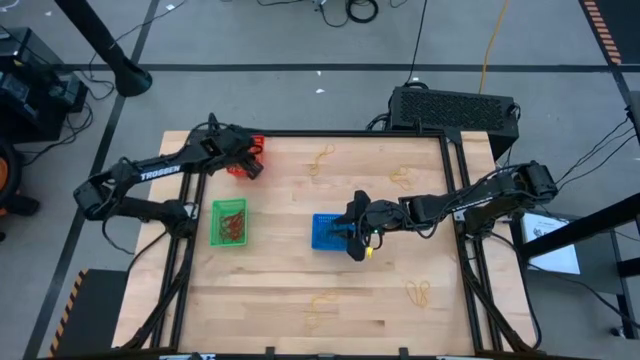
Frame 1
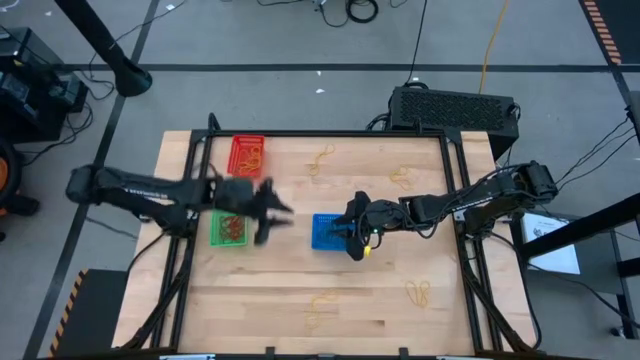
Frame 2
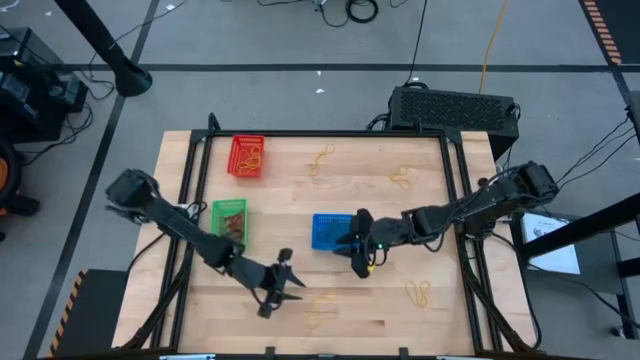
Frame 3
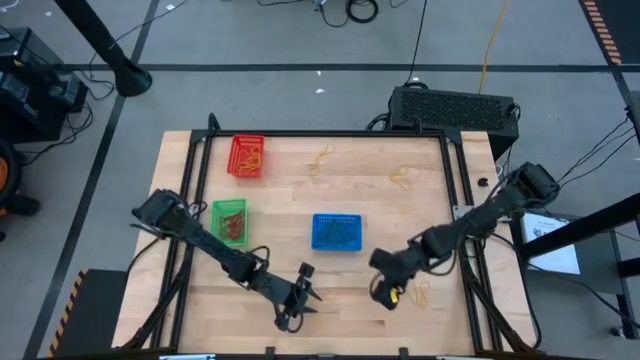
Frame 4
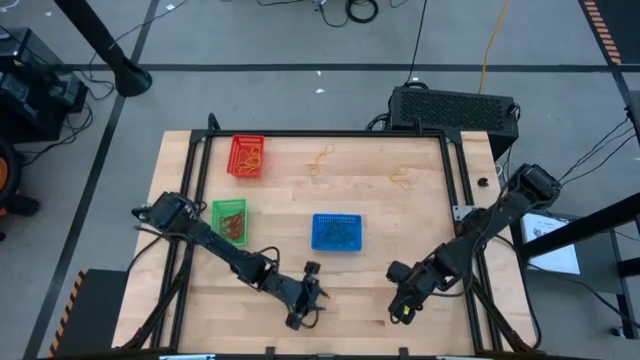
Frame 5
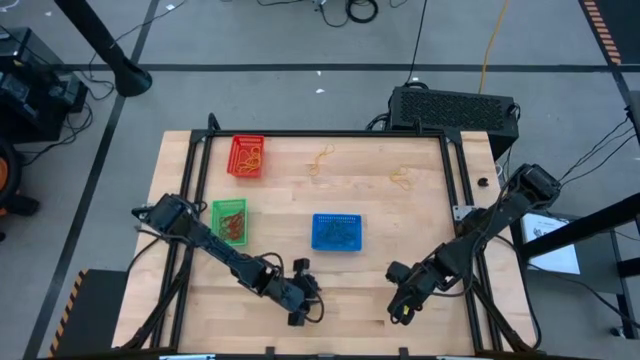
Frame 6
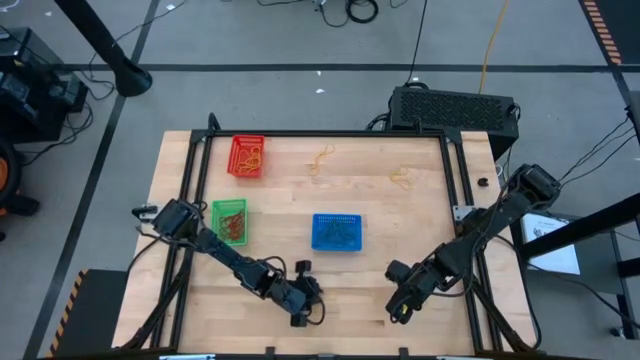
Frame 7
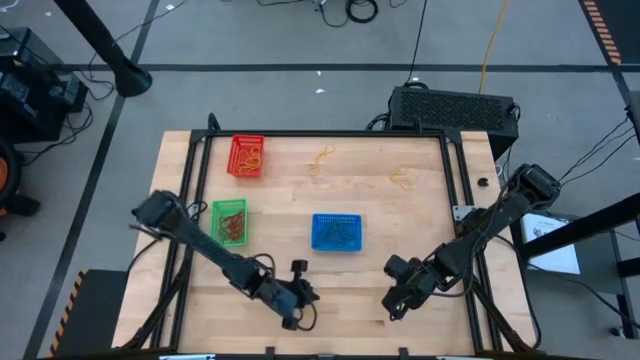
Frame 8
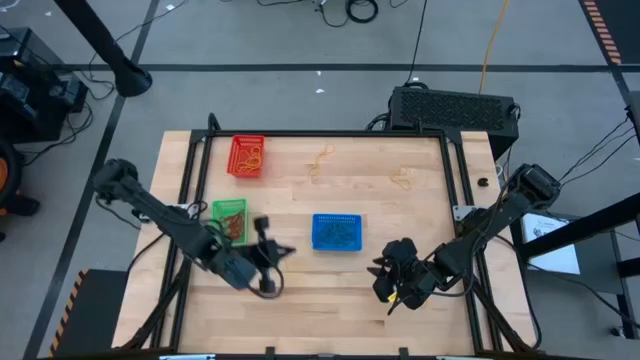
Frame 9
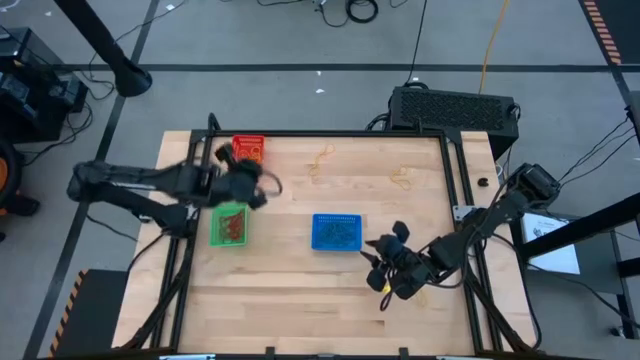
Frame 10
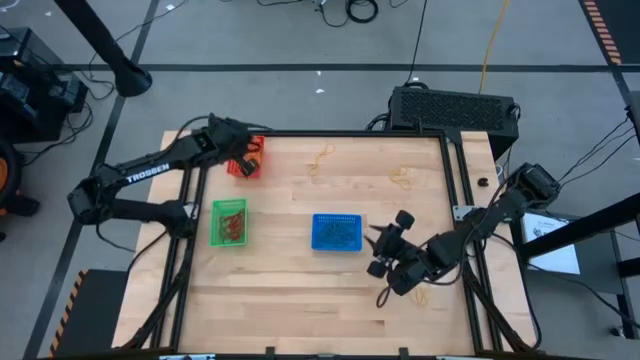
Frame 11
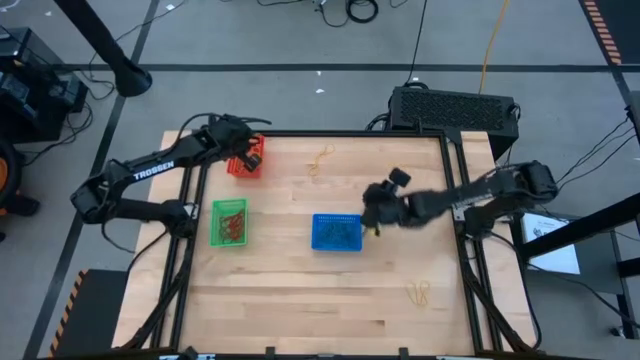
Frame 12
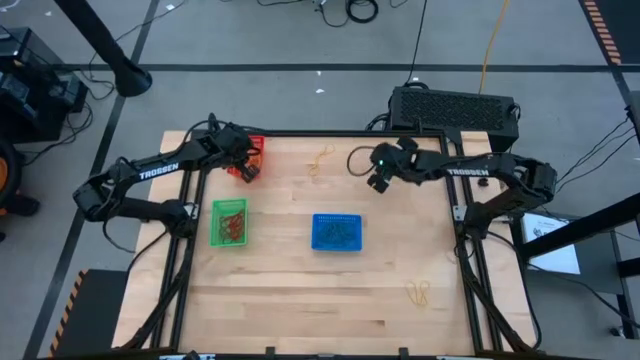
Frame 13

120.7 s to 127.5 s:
Task: Sort rubber bands into baskets
Put the yellow rubber band into the red bin

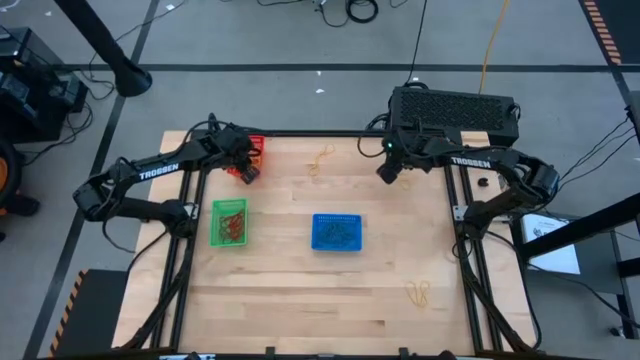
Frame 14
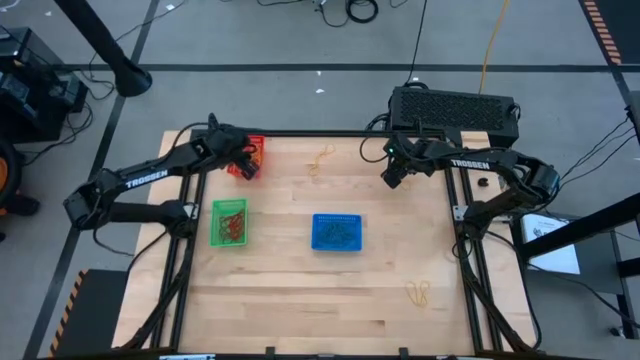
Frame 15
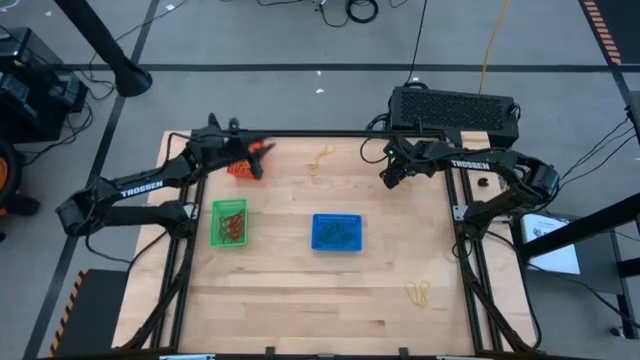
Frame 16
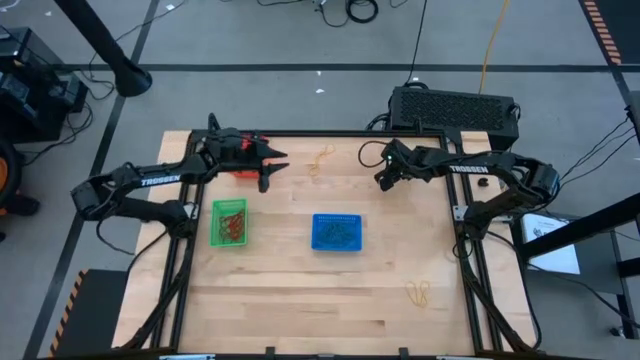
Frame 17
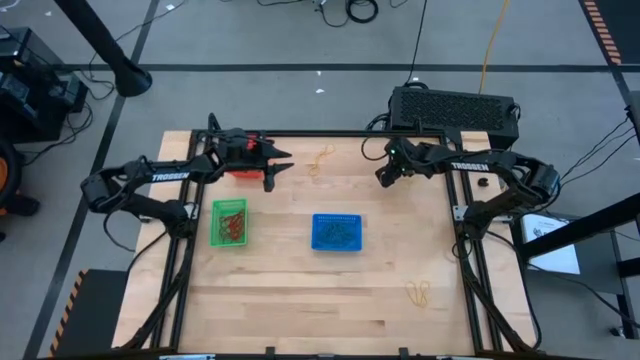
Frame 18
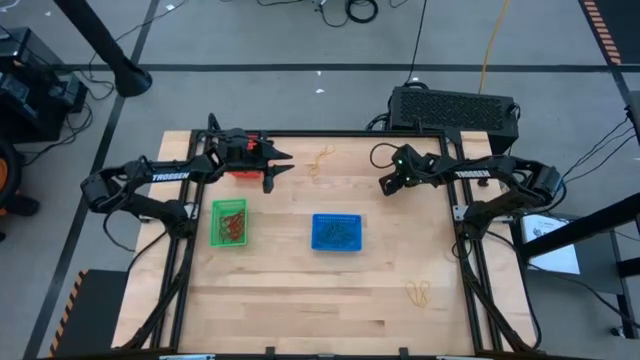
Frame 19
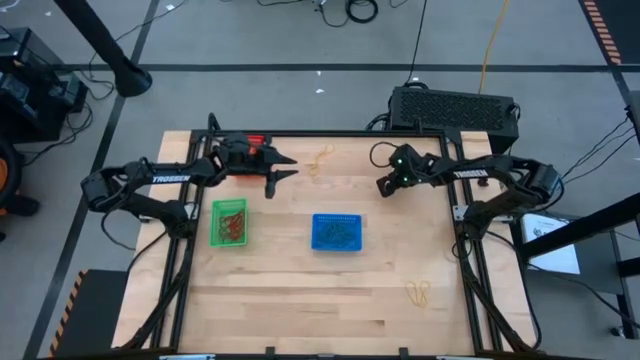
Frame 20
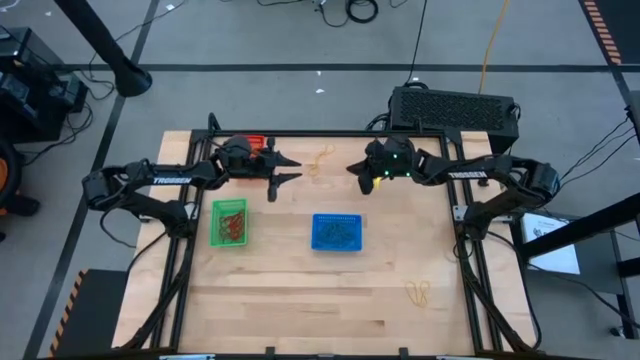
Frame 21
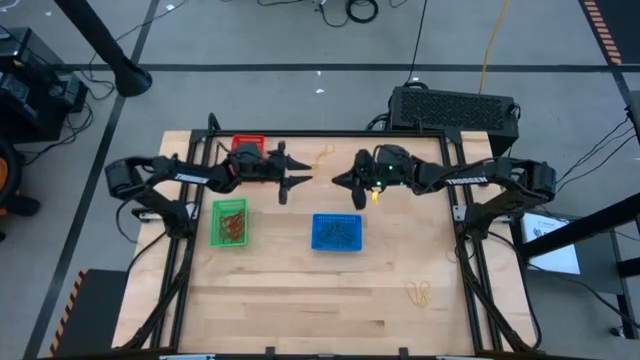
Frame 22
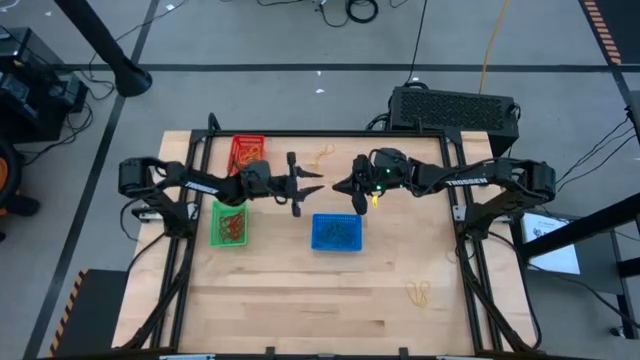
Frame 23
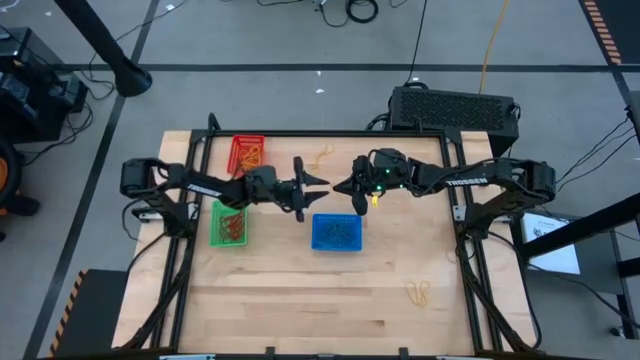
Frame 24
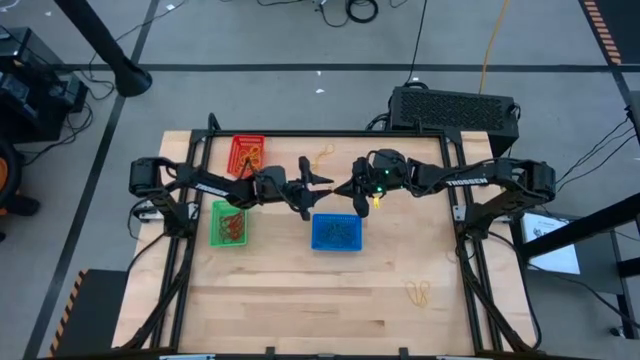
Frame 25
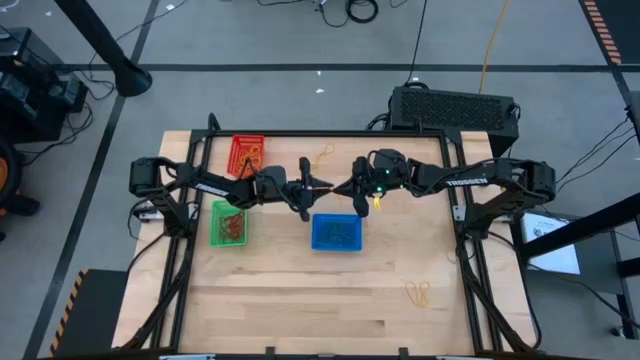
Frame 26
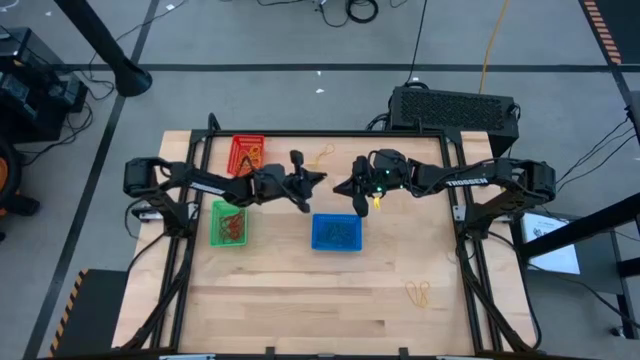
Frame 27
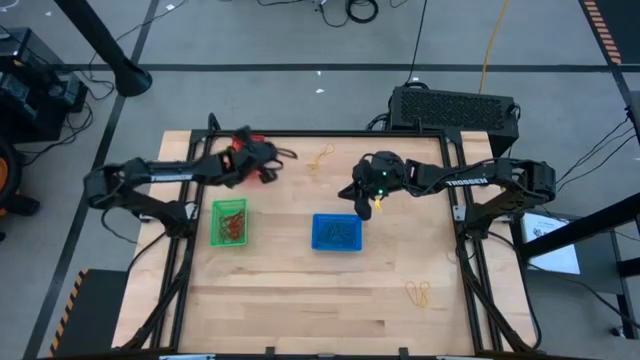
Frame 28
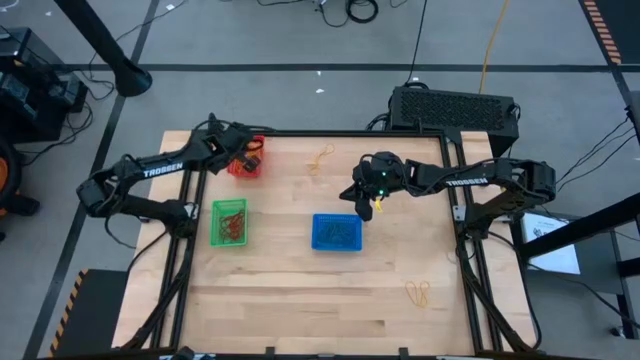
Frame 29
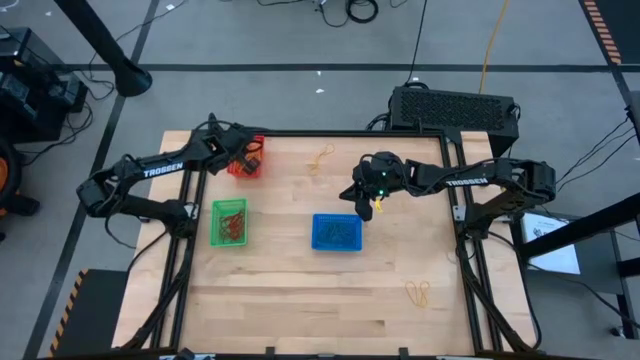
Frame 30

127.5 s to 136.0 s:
Put the yellow rubber band into the red bin

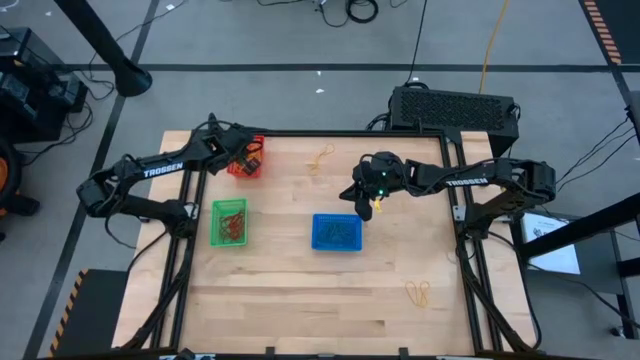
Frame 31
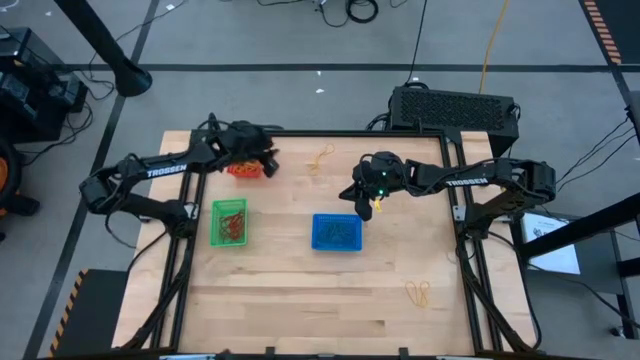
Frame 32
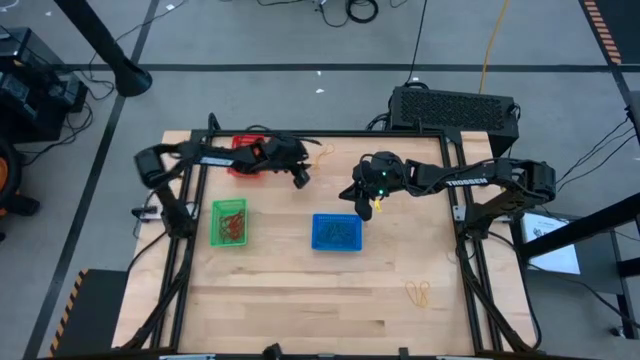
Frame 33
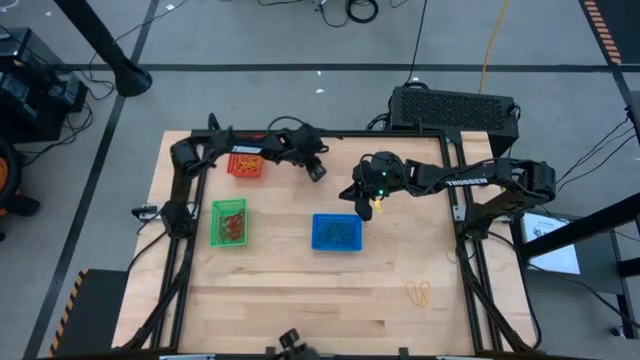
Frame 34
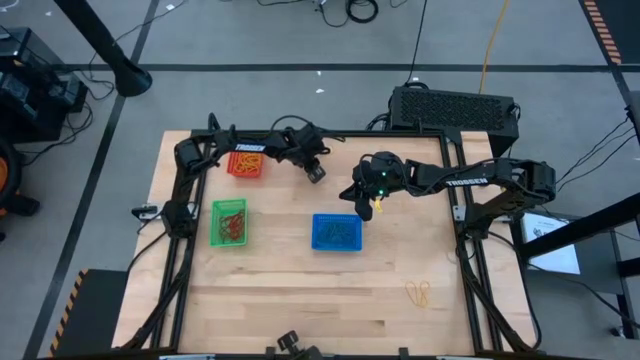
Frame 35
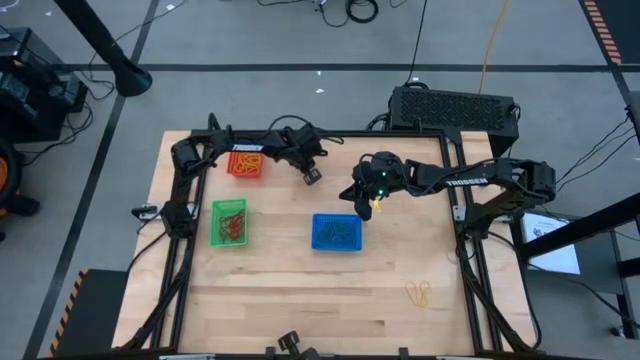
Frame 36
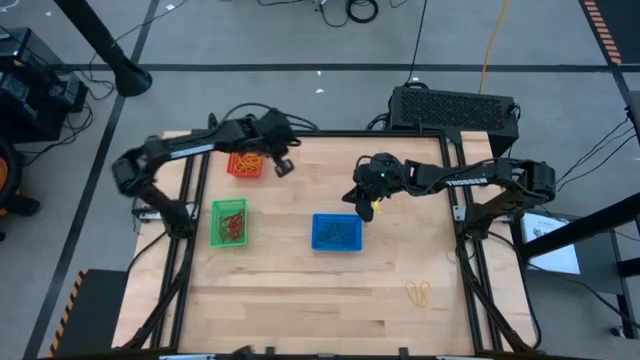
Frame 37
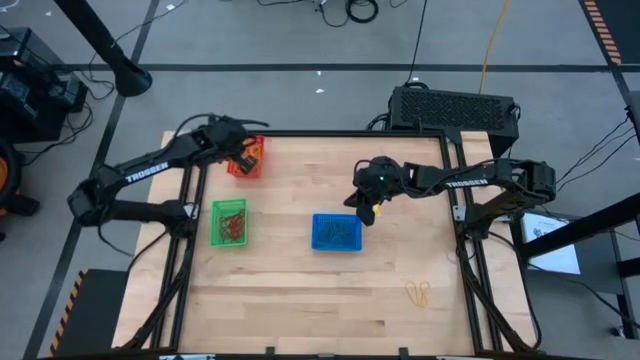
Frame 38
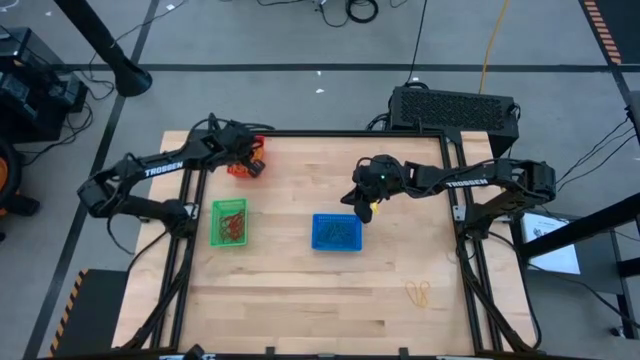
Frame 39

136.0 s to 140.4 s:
Put the yellow rubber band into the red bin

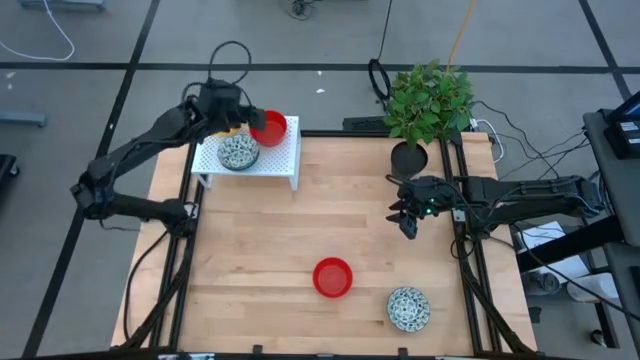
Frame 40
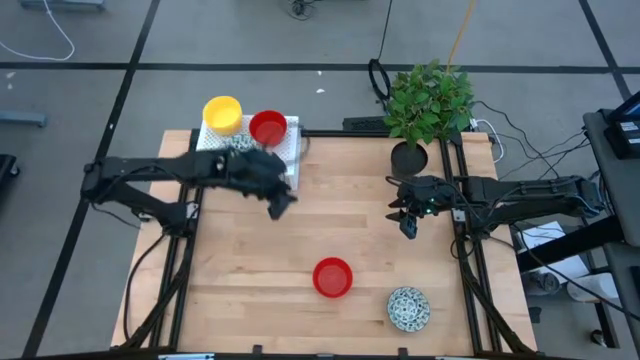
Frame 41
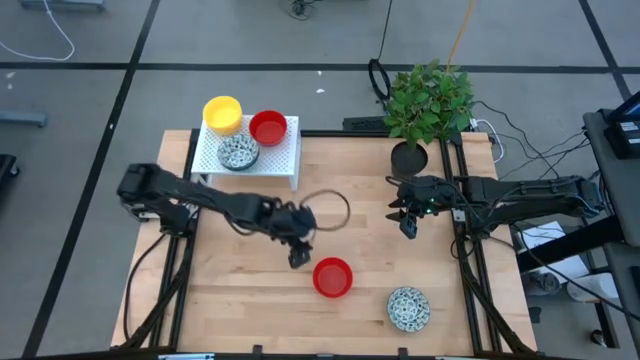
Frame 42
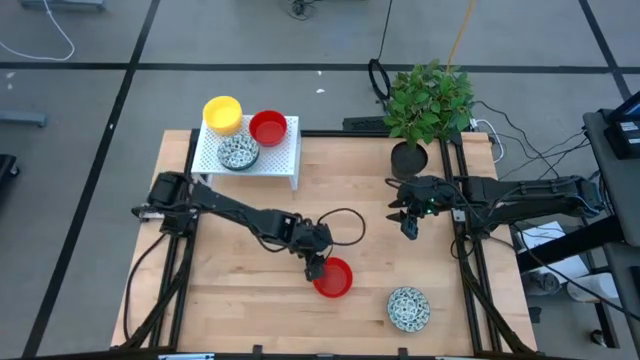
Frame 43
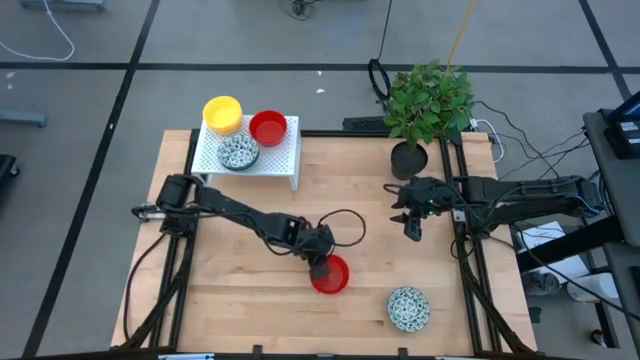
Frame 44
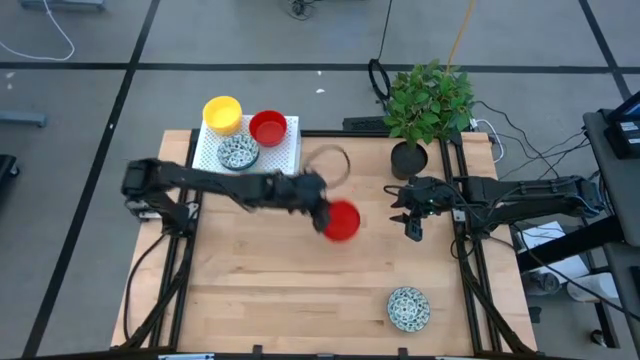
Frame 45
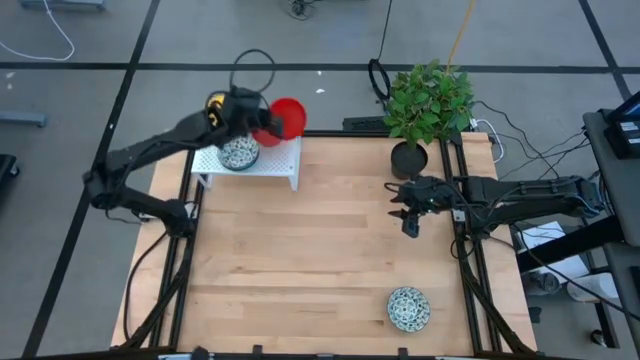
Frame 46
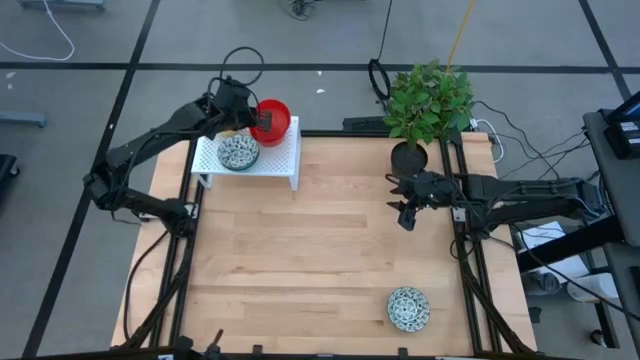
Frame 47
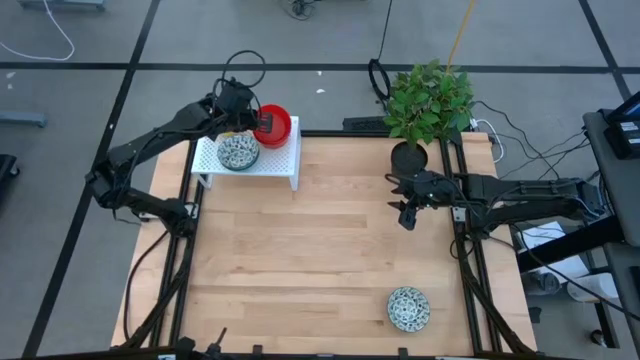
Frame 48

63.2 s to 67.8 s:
Task: Pick & Place Mini bowls
Stack the red bowl on the red bowl on the shelf
